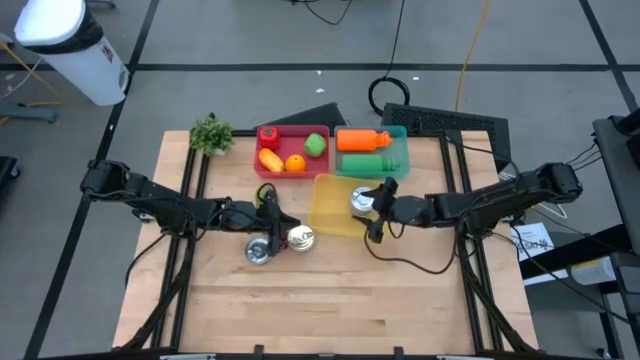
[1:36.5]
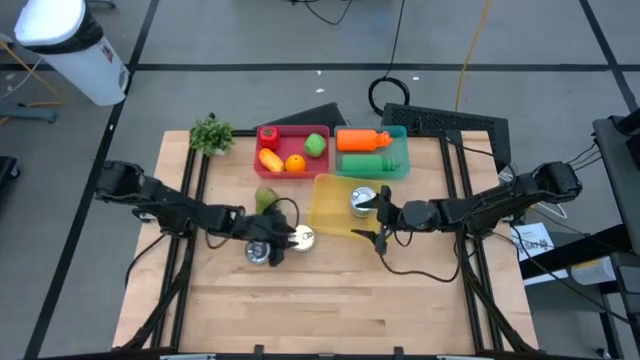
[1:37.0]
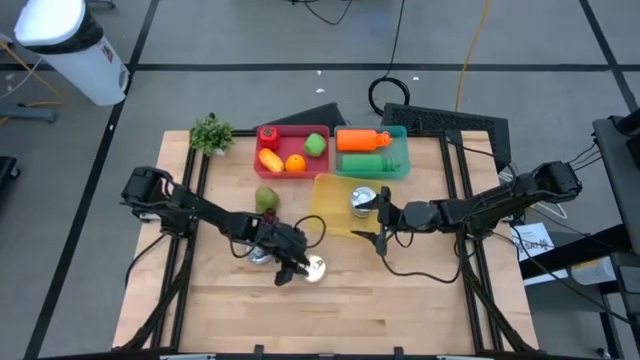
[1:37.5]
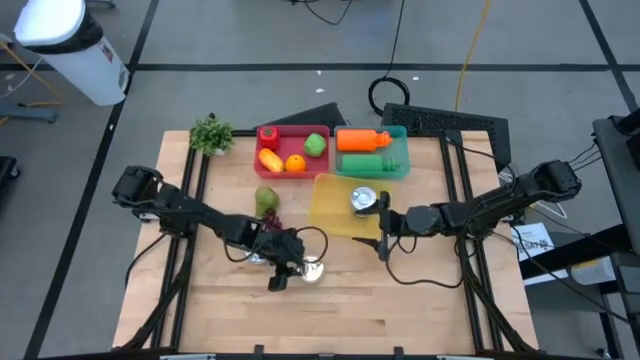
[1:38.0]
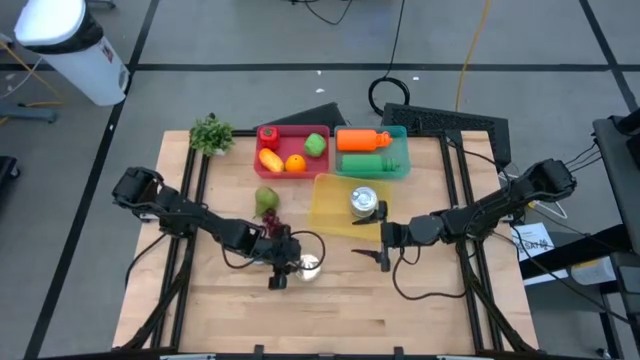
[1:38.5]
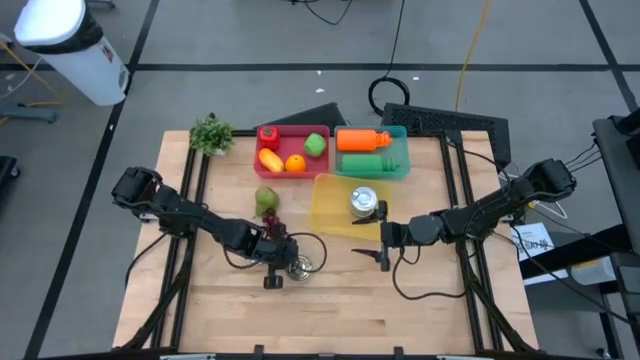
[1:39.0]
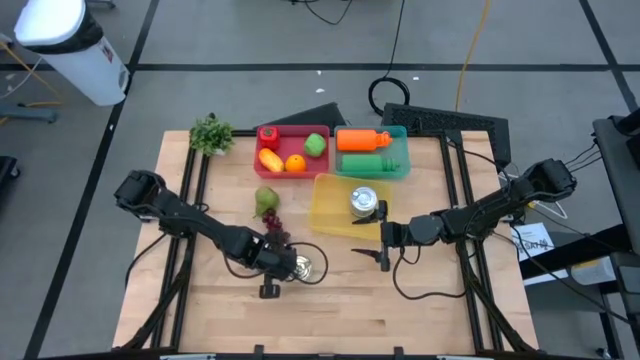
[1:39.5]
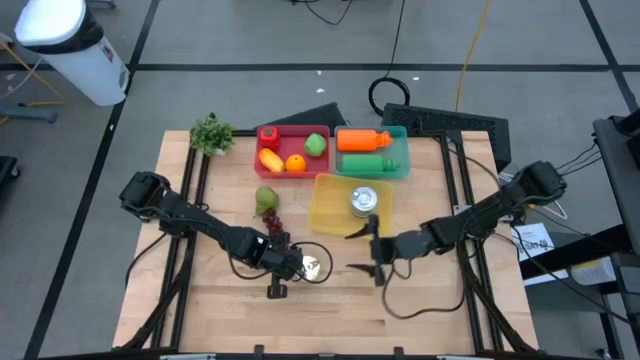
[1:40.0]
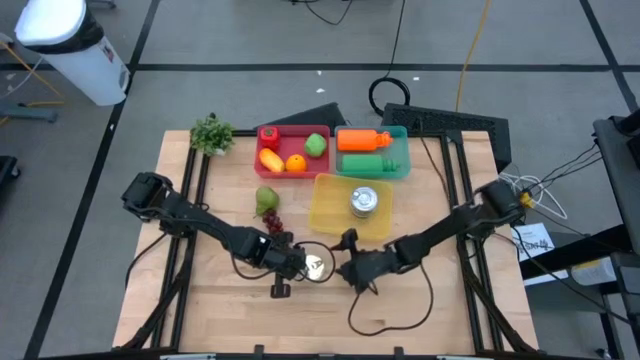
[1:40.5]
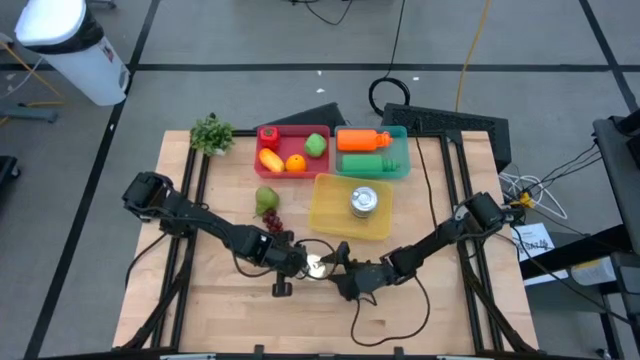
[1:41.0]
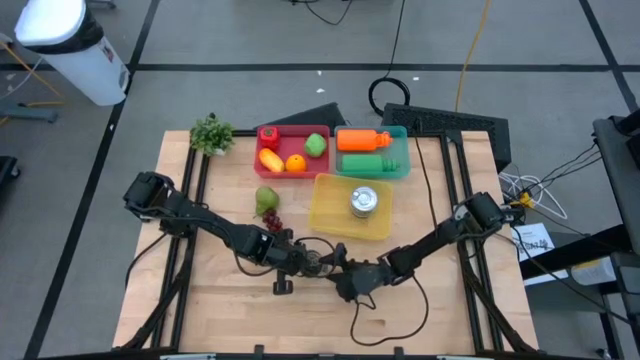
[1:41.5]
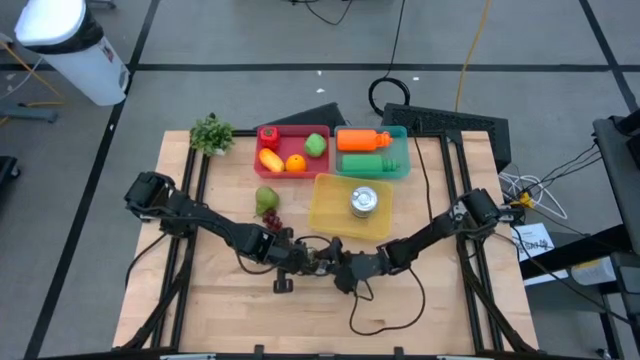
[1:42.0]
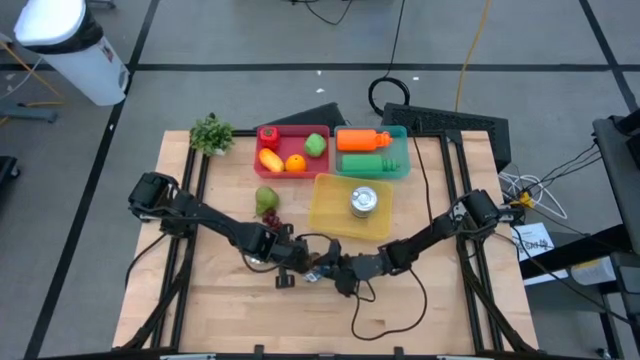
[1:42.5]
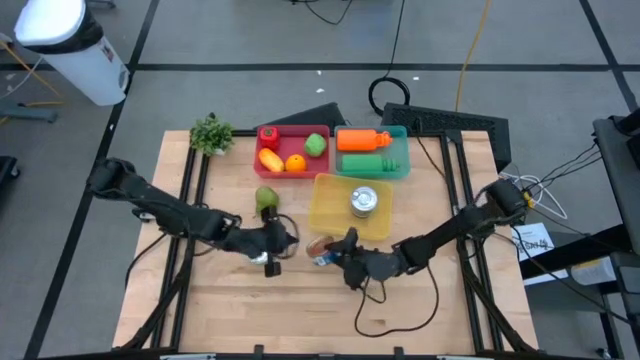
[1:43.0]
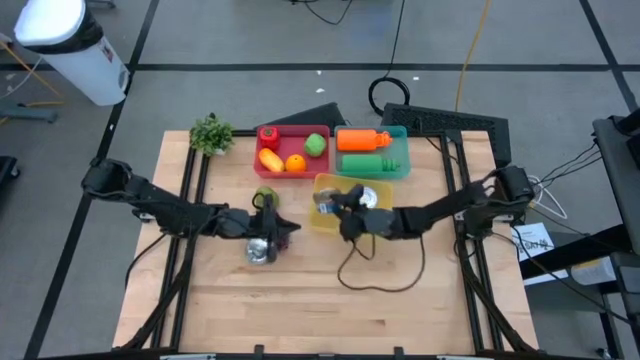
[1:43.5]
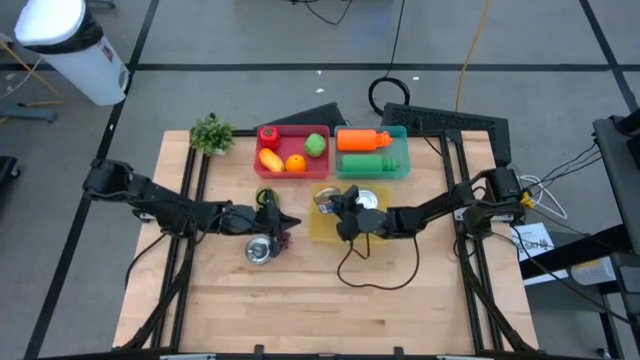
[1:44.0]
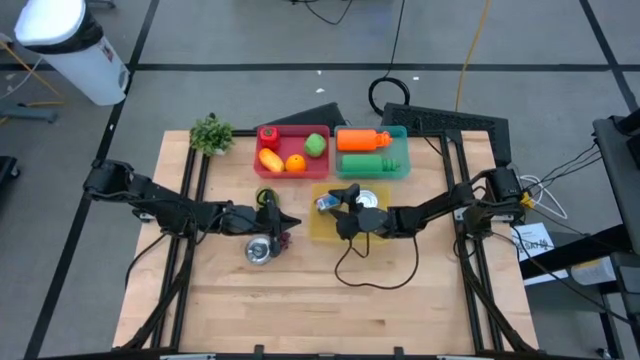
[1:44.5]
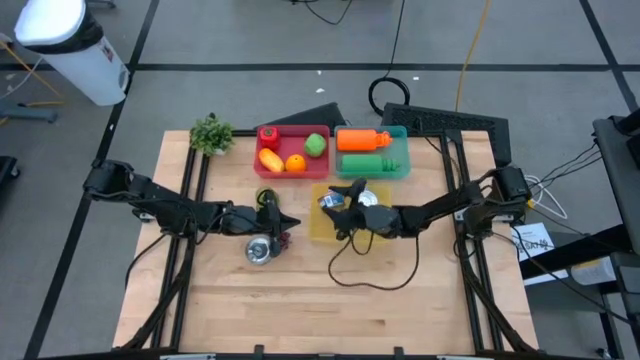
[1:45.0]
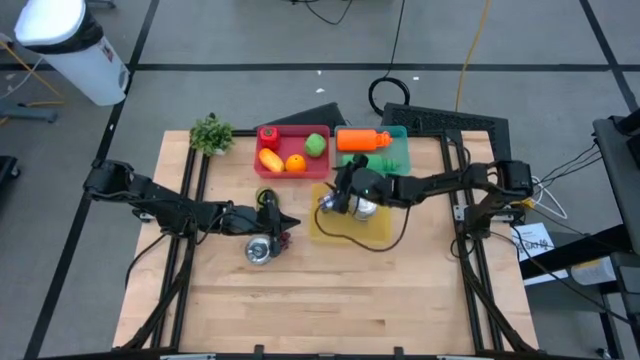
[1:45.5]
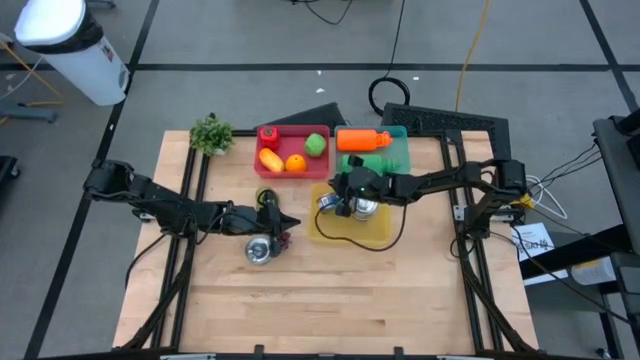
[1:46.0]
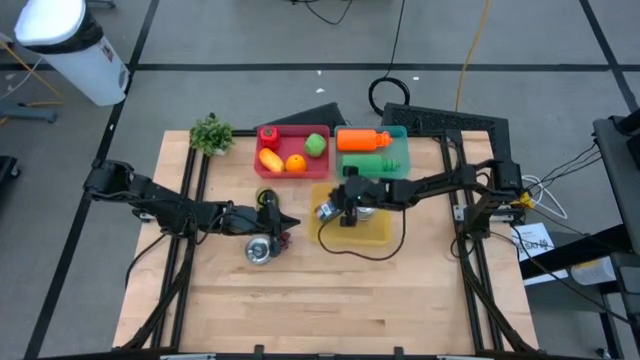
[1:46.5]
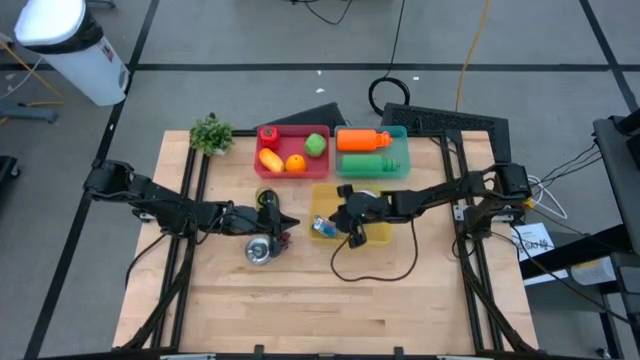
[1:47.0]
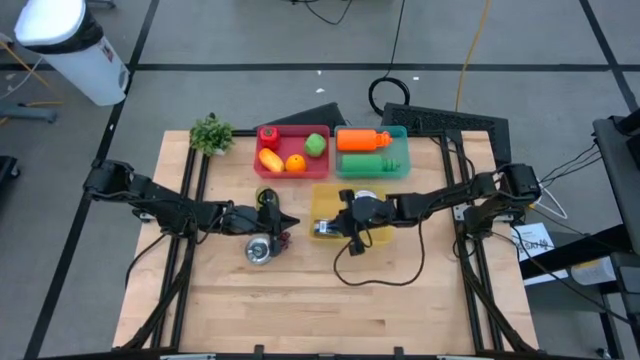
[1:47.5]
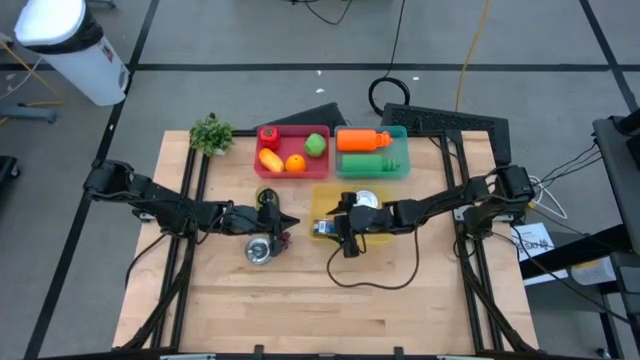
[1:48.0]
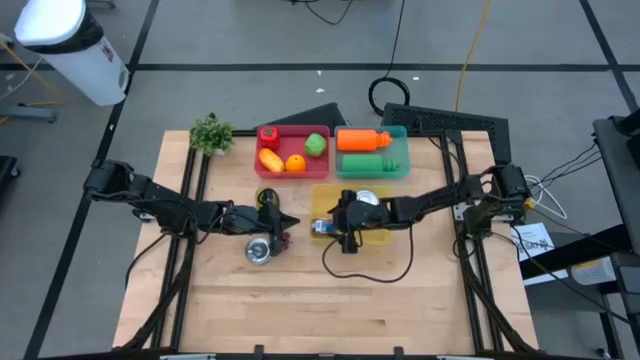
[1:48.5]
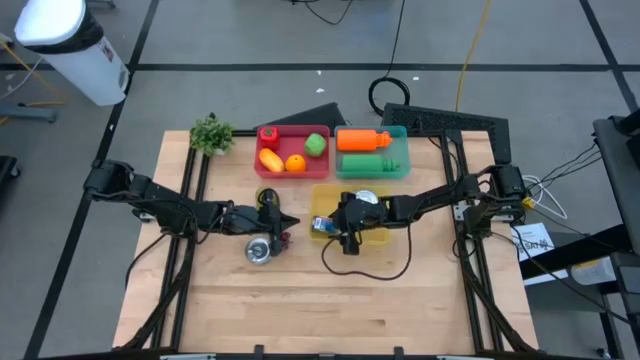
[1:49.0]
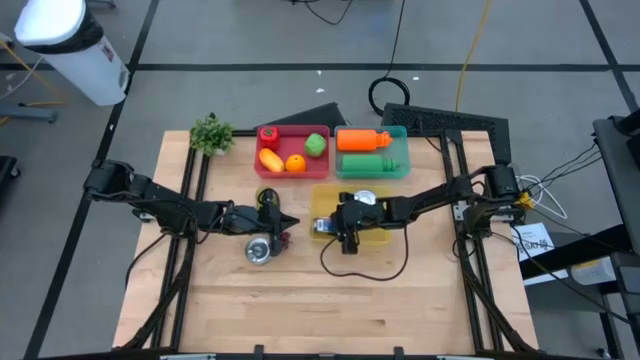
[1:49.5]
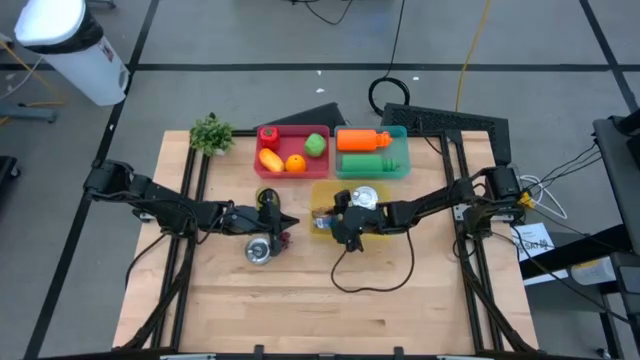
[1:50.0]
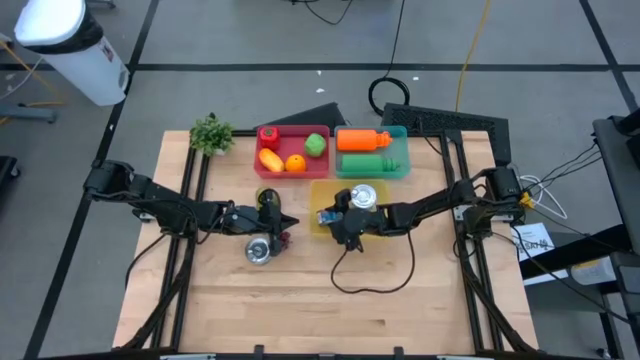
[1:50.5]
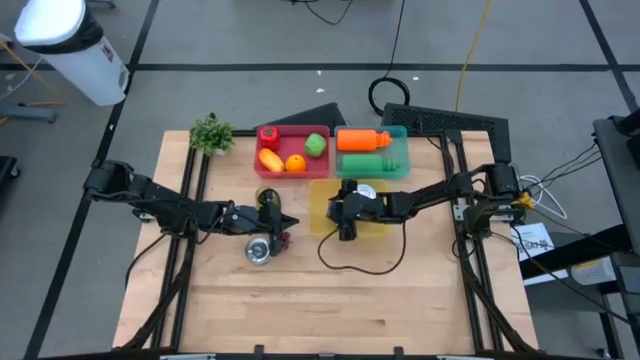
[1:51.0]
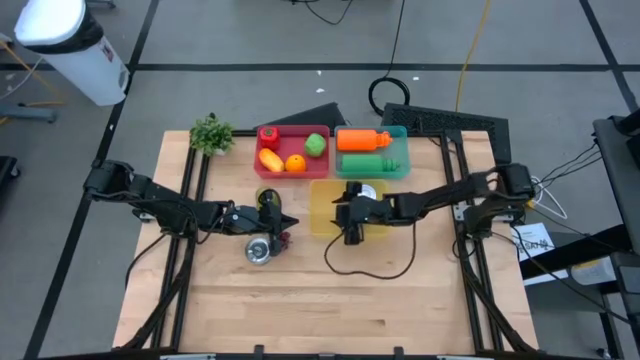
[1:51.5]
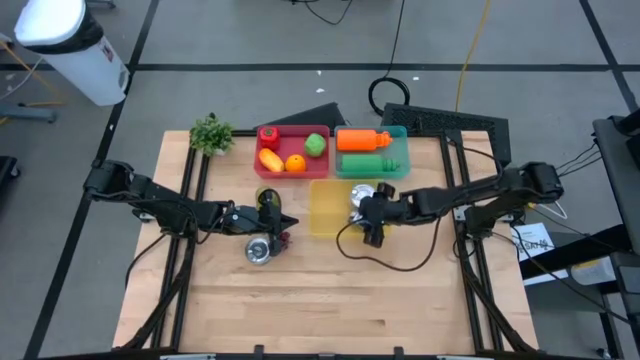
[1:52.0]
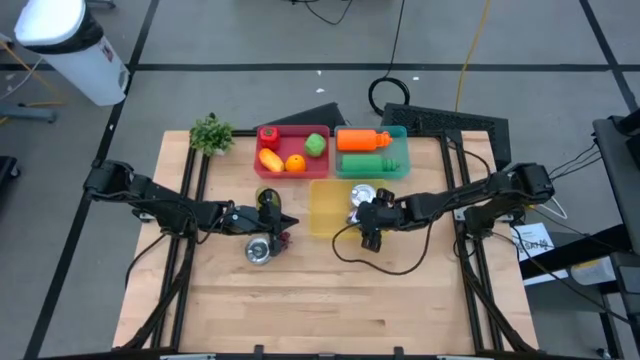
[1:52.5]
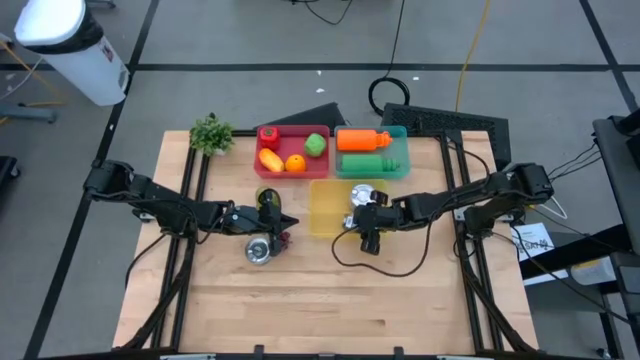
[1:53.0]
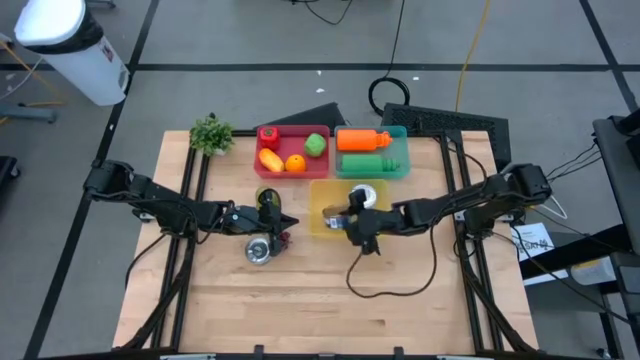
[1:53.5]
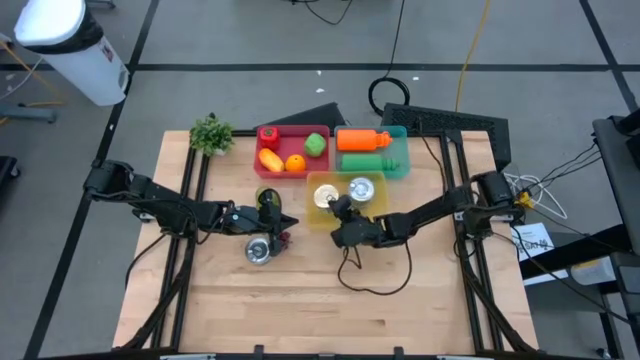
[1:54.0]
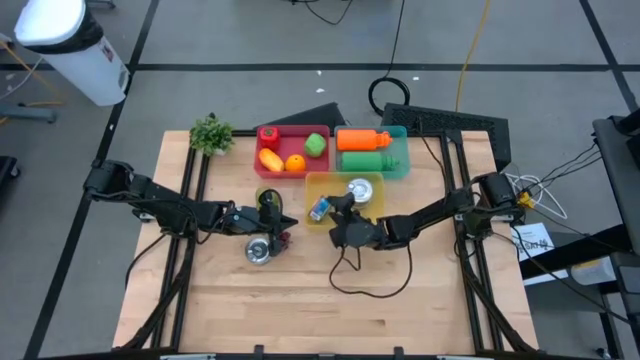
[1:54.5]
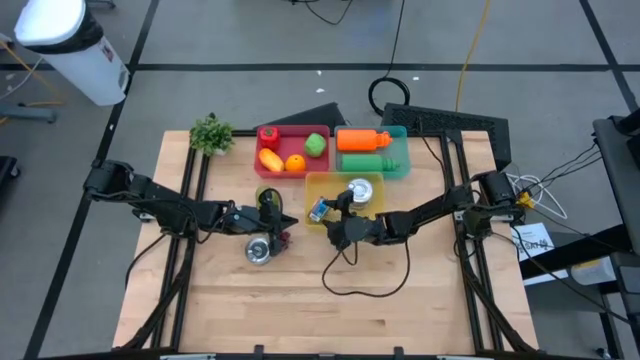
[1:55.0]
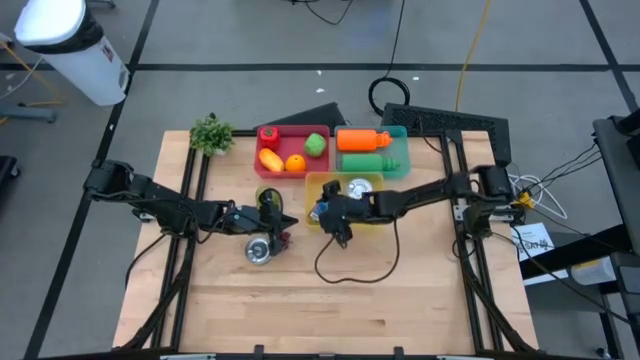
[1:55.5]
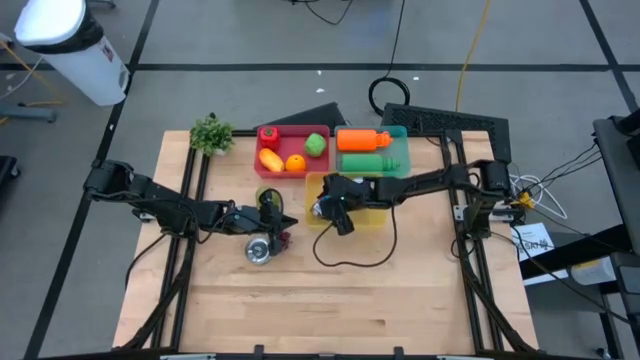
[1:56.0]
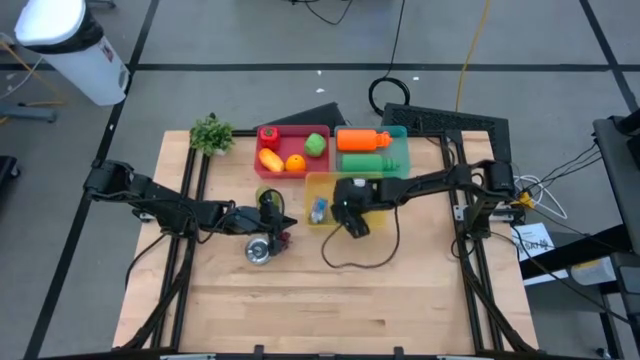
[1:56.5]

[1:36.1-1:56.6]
Task: Pick & Place Food Item
Put the blue tuna can into the yellow bin

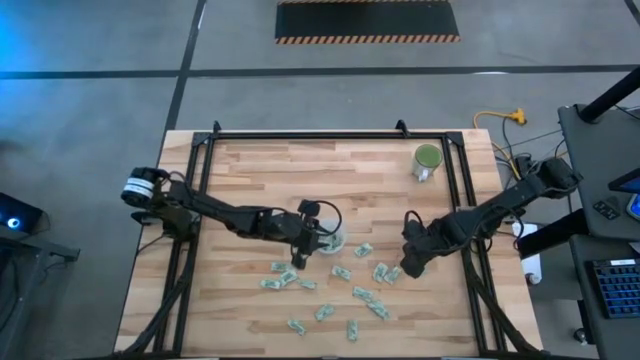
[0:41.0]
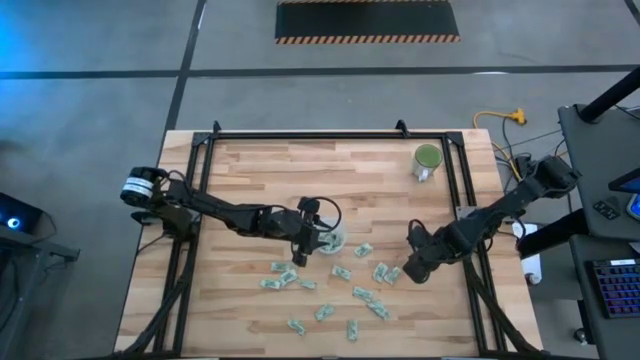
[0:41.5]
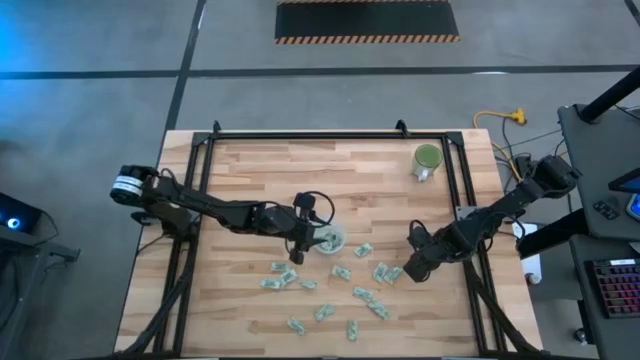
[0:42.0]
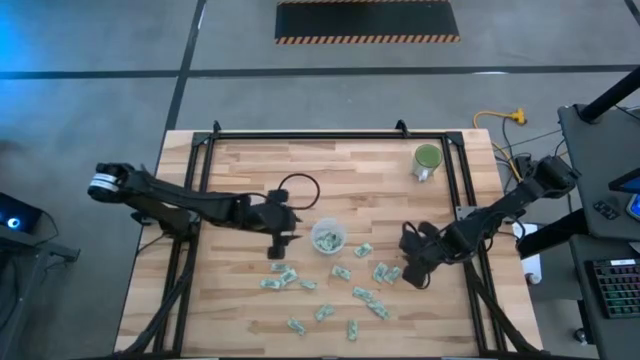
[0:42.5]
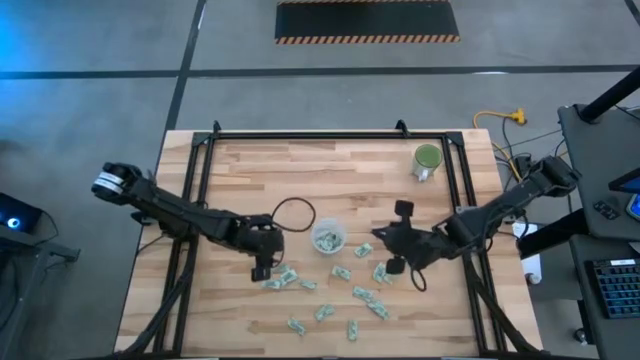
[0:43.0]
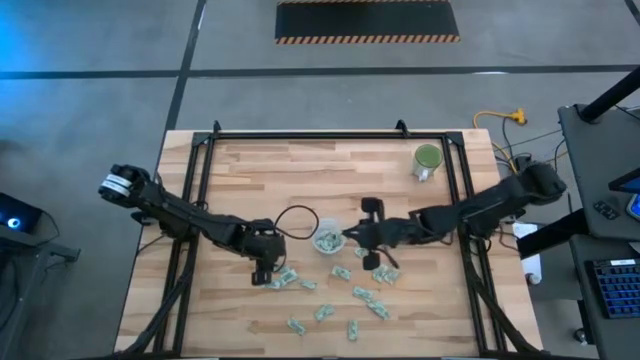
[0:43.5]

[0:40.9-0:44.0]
Task: Pick and place Stevia / Truvia into bins
Put the light green stevia packet into the transparent container
